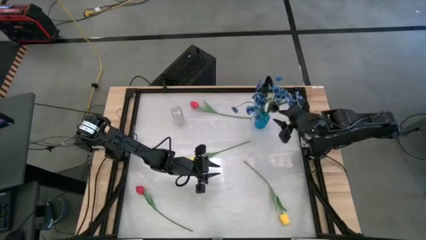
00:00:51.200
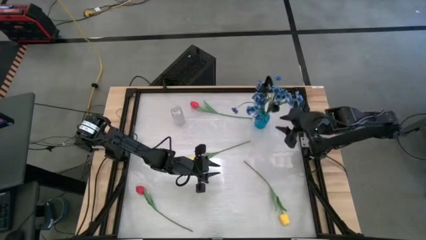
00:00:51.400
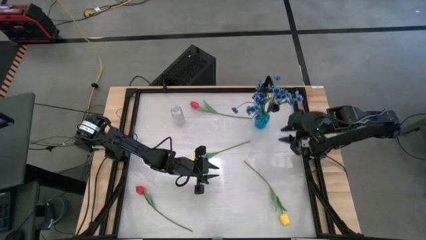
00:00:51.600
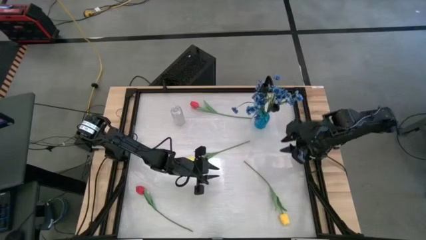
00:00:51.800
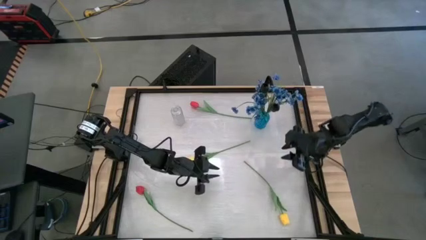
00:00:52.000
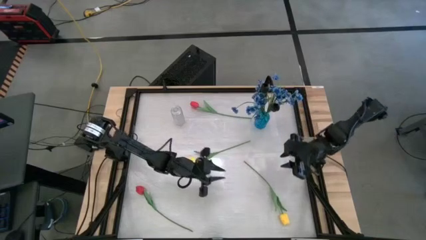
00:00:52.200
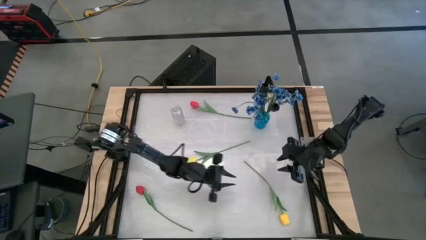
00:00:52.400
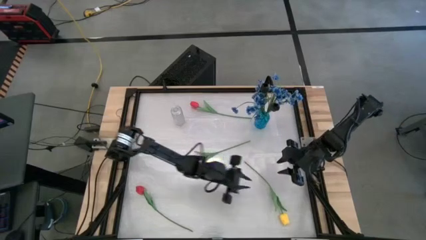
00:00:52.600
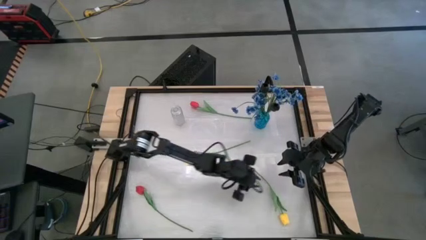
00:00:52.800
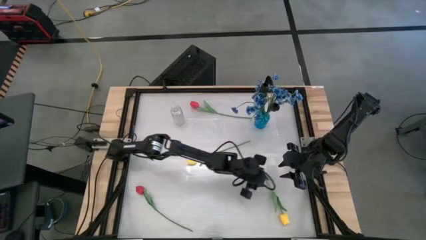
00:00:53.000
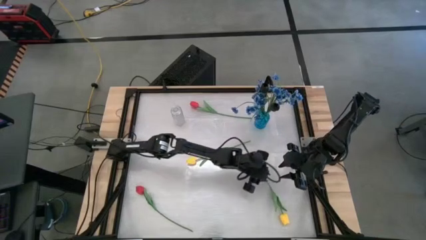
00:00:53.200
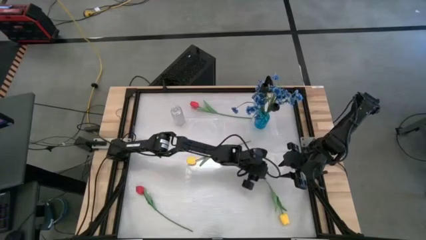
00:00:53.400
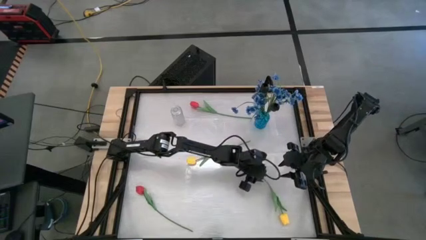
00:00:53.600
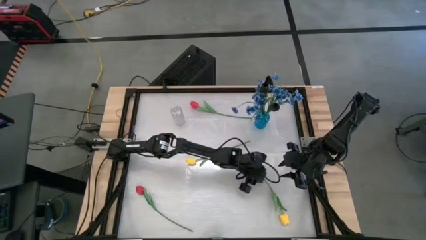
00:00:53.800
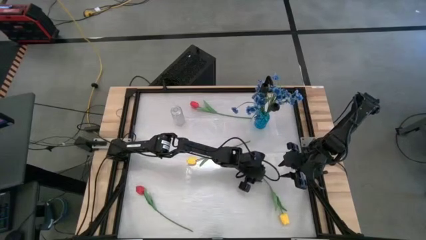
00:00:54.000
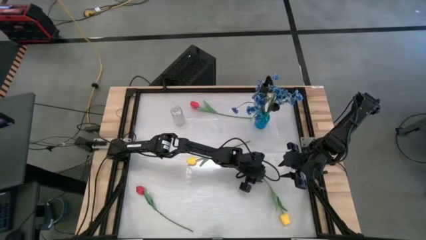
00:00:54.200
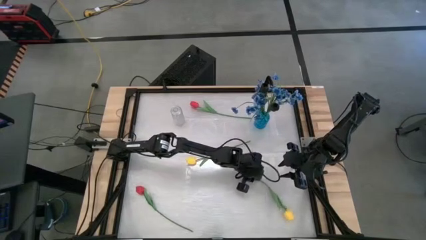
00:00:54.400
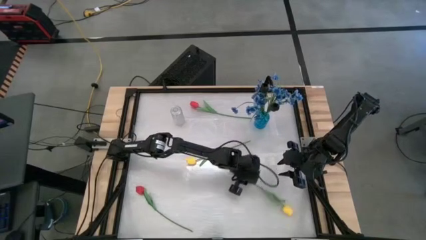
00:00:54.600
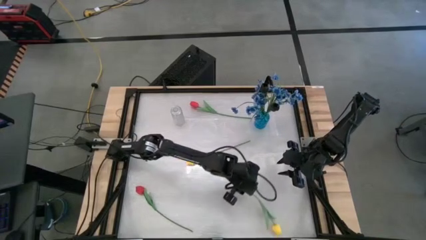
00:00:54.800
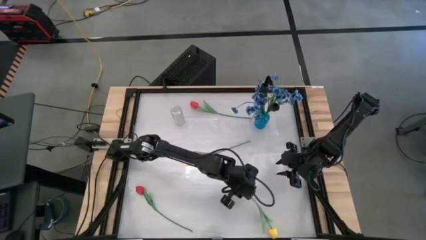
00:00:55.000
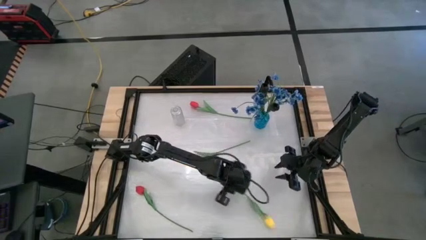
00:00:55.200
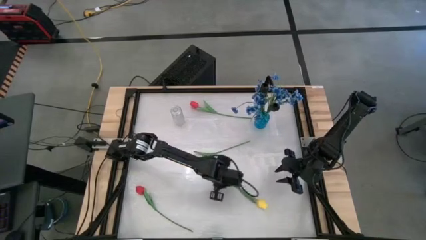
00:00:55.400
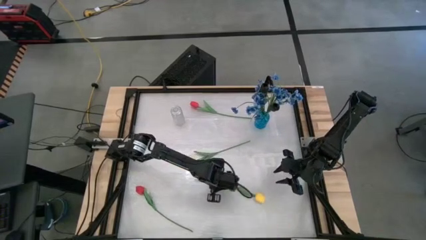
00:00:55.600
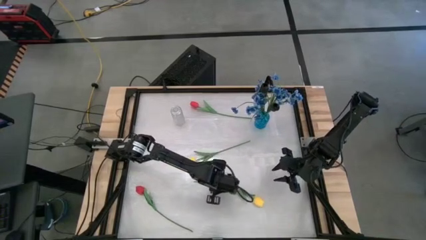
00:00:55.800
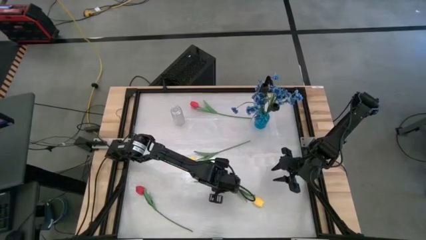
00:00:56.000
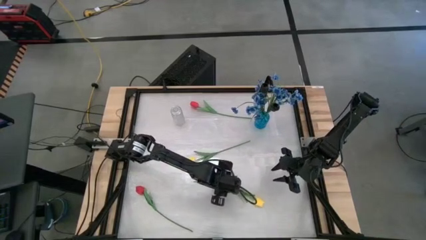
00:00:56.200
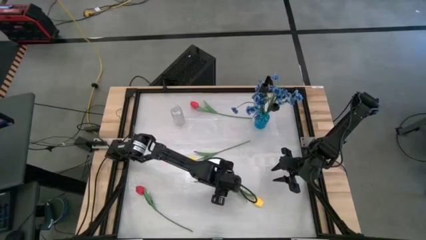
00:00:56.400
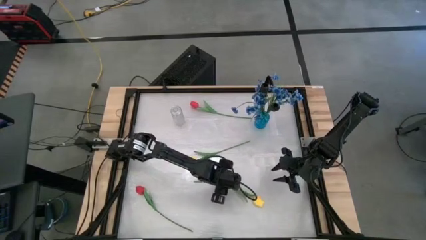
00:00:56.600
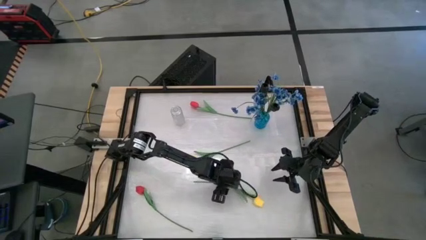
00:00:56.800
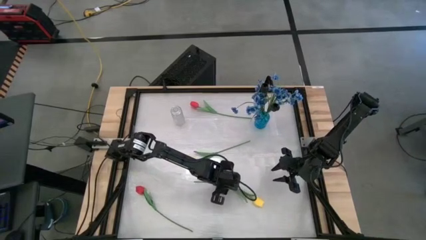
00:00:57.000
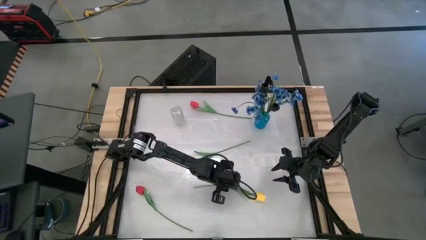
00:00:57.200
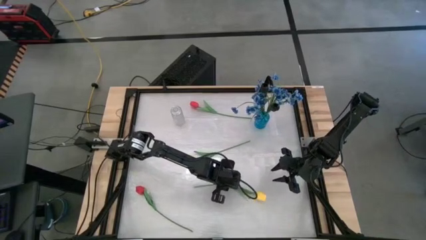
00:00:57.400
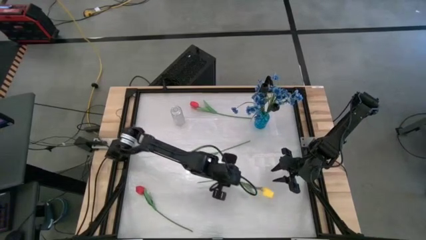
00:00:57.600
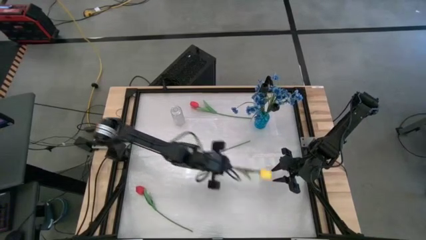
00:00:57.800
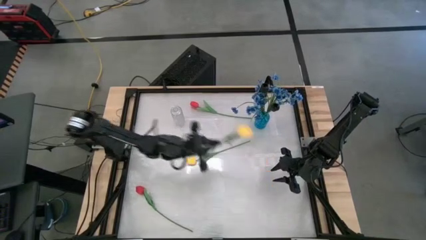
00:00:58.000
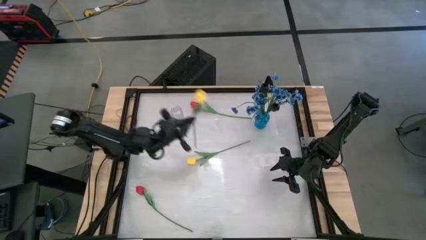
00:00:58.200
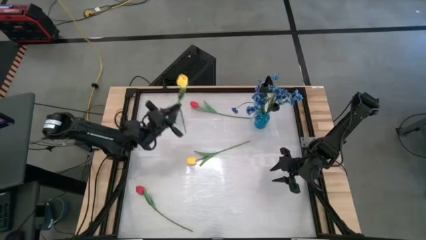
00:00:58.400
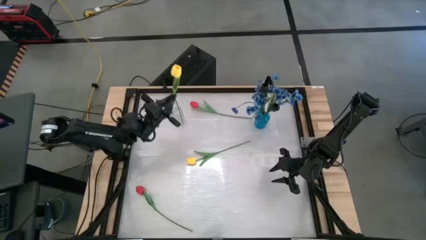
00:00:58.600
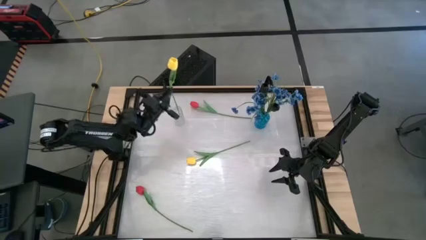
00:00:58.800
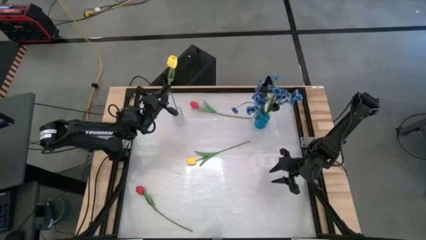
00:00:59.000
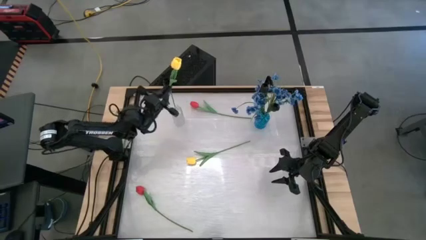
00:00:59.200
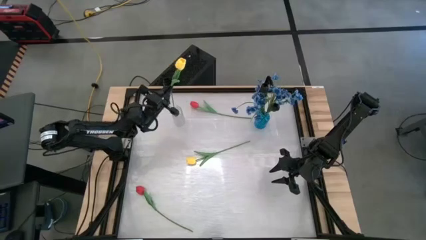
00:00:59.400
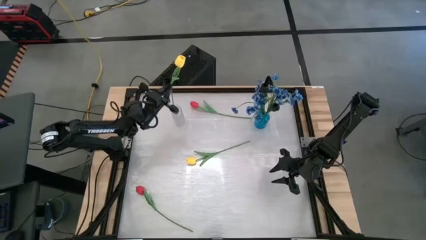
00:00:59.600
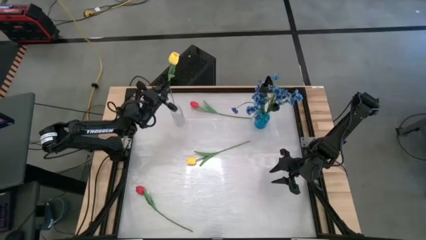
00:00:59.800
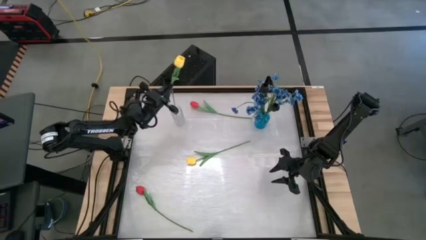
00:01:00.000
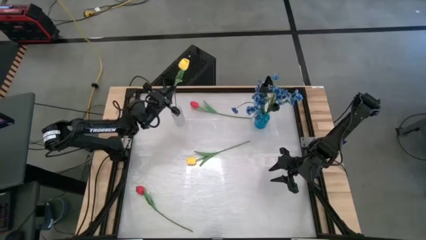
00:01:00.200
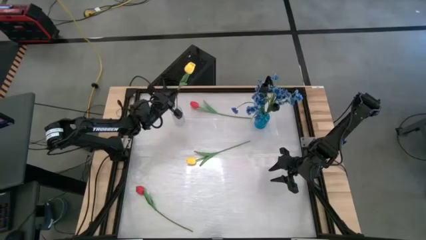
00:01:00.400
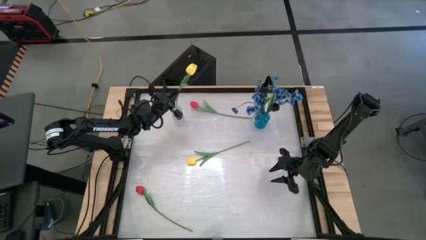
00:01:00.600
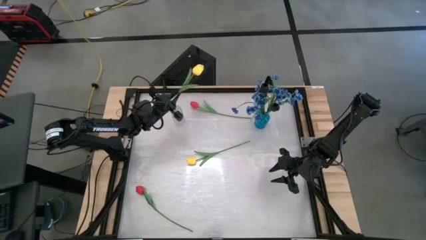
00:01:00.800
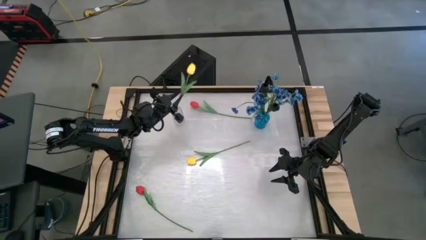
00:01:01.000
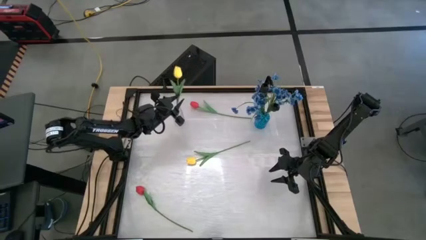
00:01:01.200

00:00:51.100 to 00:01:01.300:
Task: Sort flowers into vase by color
Put the bottom yellow flower into the transparent vase

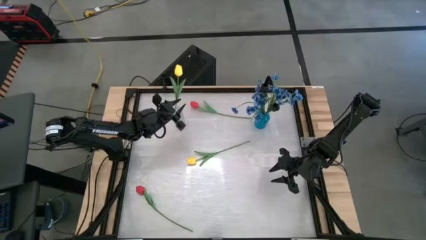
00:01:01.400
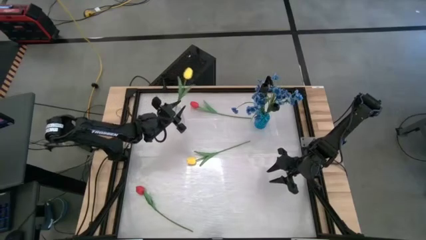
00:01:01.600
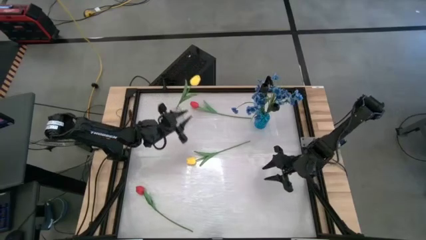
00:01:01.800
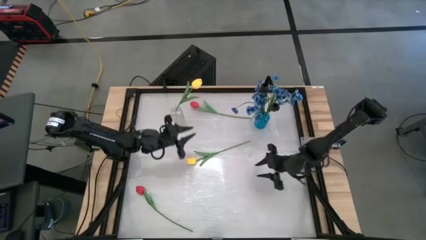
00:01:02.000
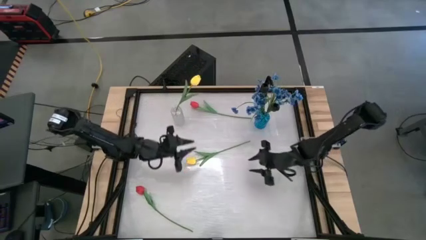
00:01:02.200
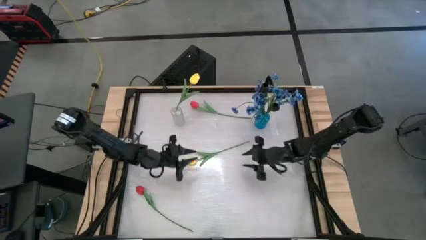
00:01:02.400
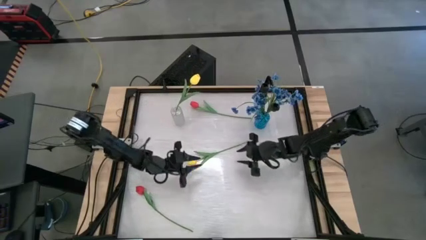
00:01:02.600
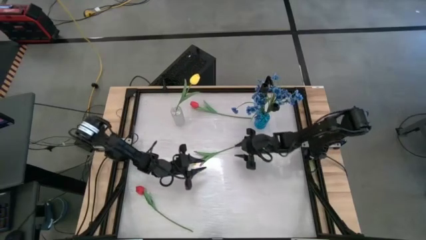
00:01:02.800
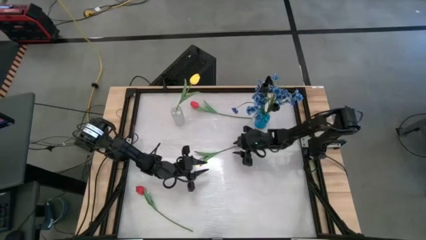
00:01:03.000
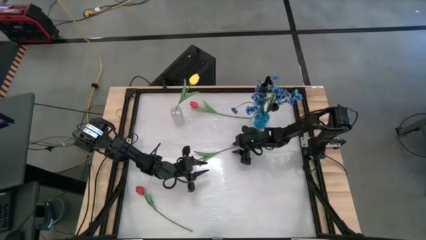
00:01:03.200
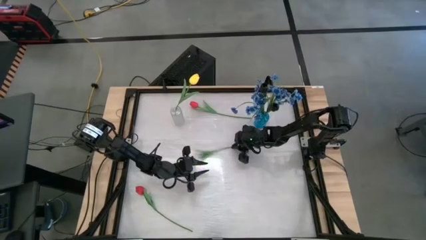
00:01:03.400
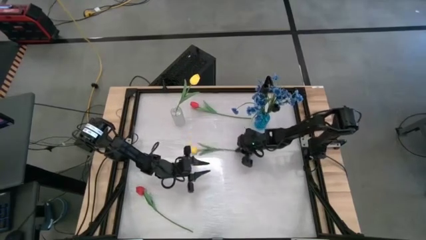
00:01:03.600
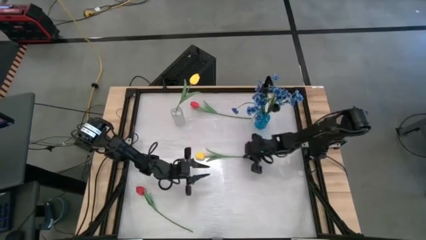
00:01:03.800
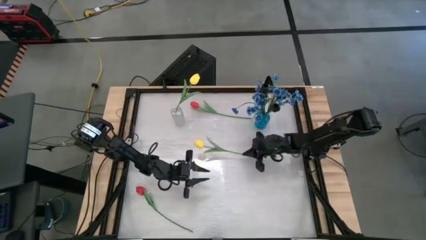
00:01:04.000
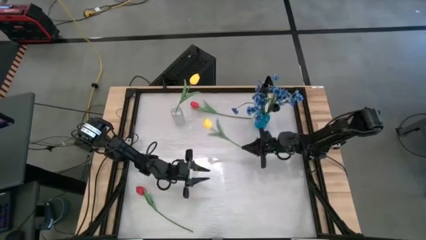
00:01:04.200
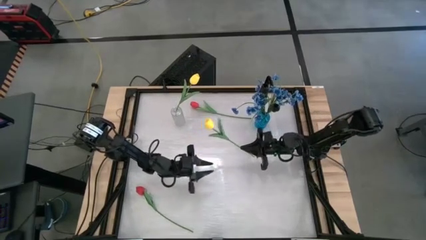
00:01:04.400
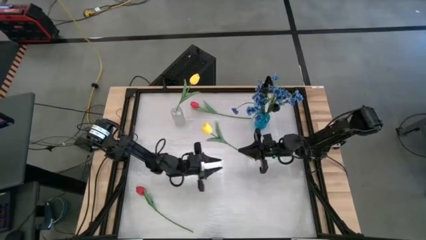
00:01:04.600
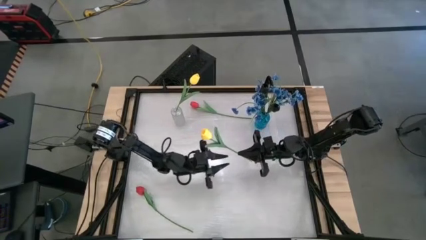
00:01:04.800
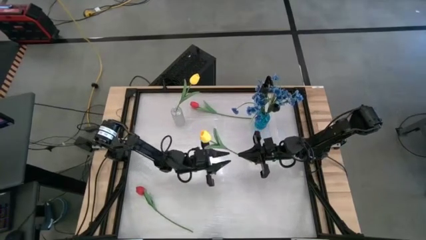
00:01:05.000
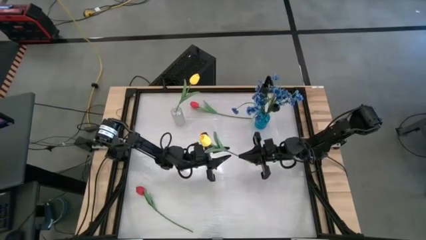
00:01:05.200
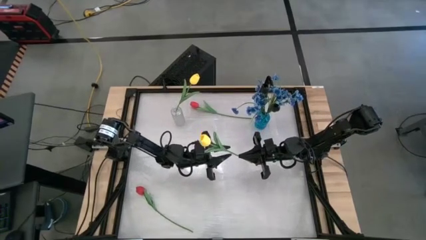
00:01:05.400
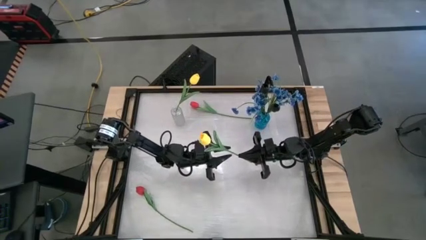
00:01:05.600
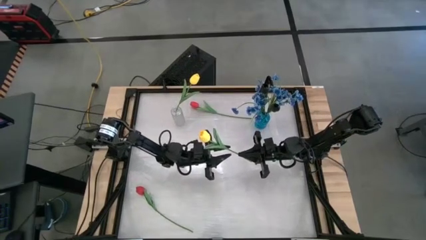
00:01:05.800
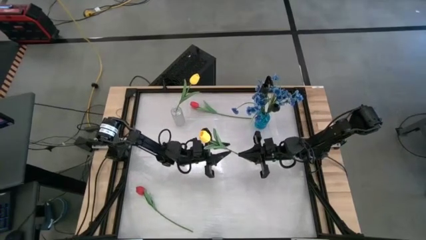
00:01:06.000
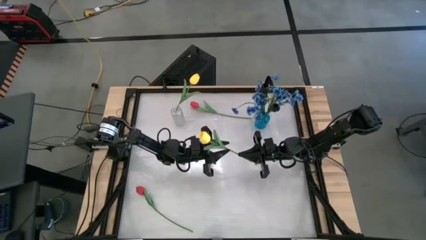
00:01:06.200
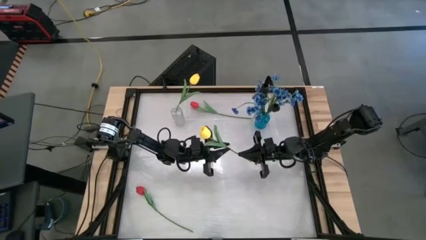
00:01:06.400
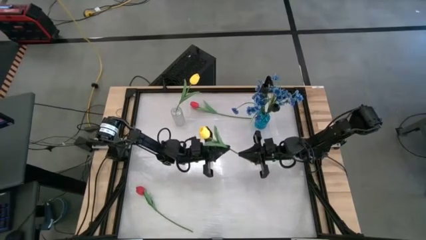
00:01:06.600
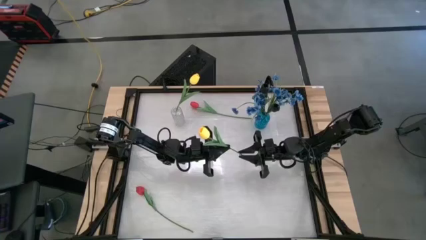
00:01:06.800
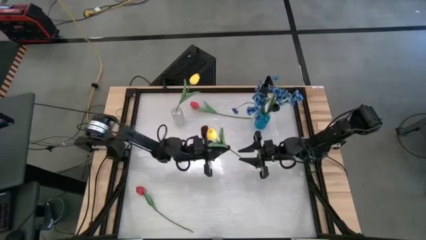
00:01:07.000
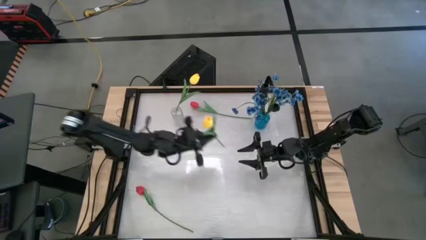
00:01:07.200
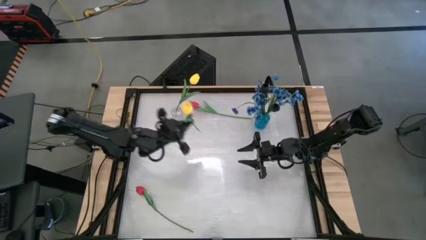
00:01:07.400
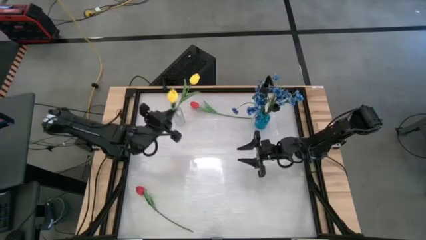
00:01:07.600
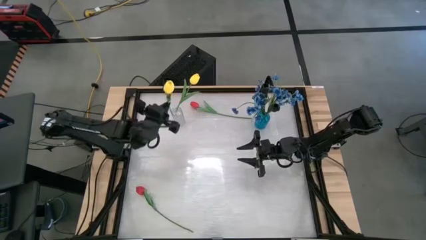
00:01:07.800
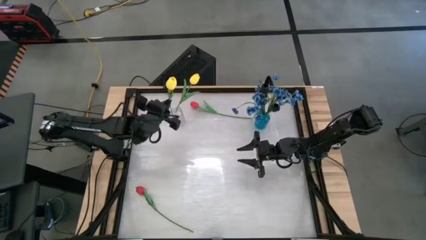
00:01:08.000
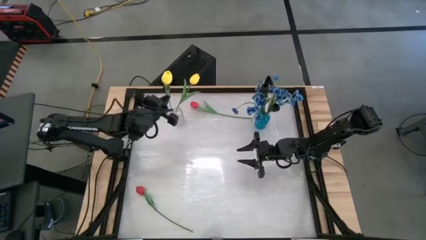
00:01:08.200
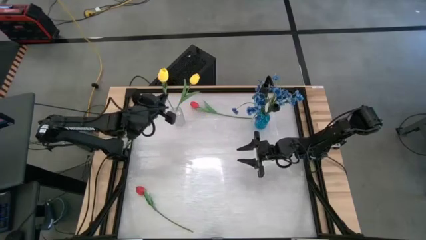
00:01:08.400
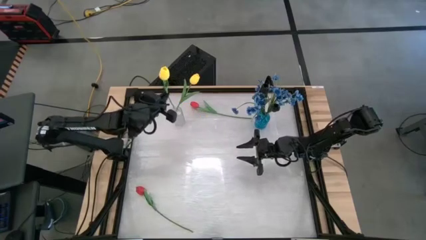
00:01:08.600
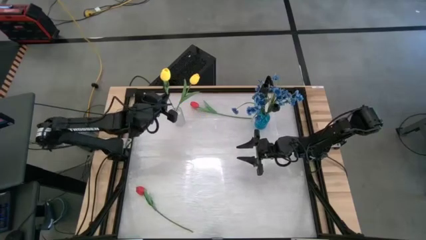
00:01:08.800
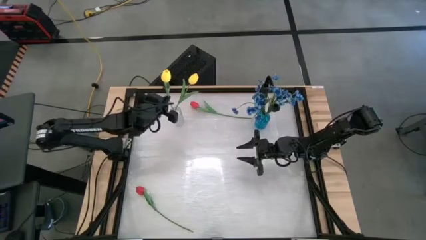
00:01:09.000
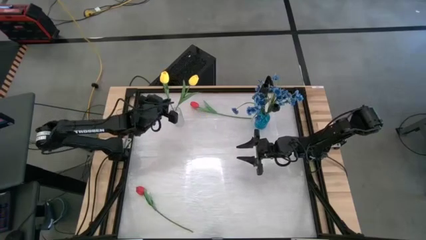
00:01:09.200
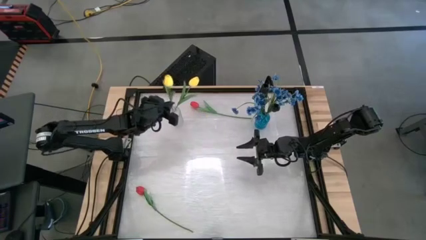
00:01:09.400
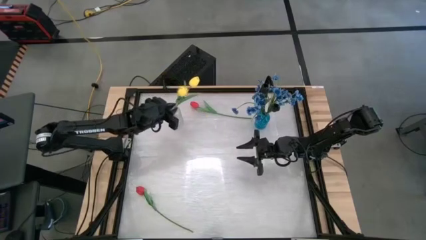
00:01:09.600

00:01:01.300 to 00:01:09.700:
Put the yellow flower into the transparent vase
